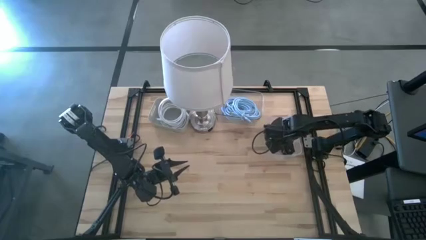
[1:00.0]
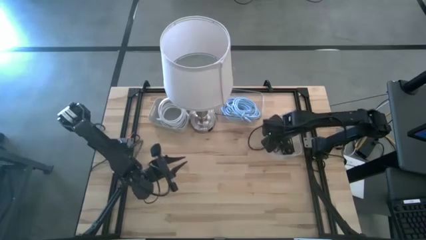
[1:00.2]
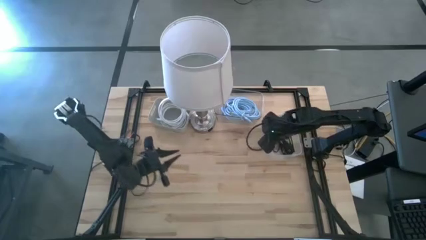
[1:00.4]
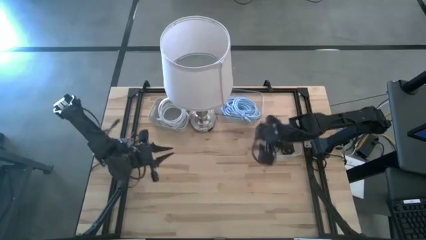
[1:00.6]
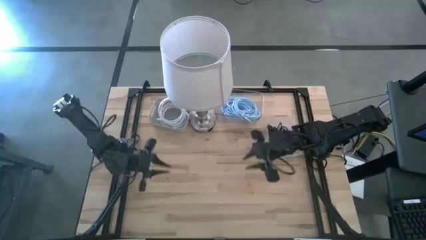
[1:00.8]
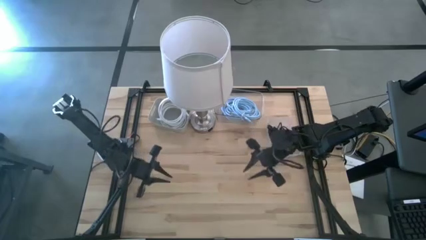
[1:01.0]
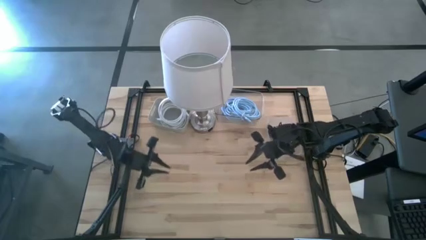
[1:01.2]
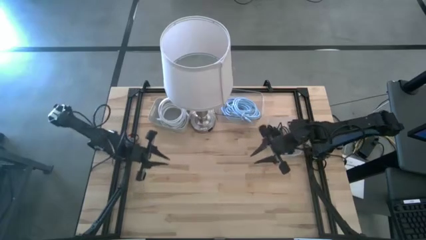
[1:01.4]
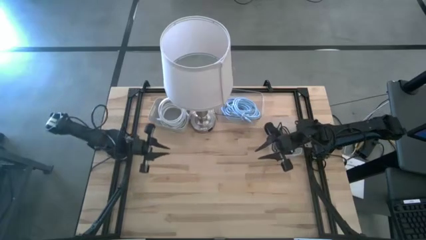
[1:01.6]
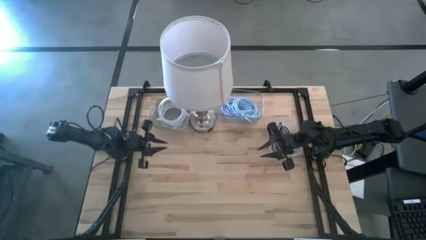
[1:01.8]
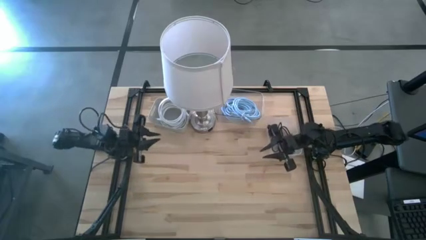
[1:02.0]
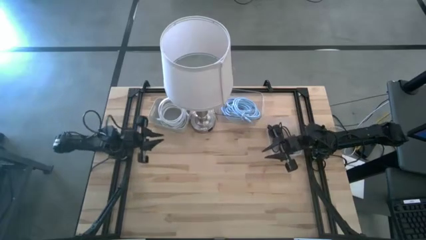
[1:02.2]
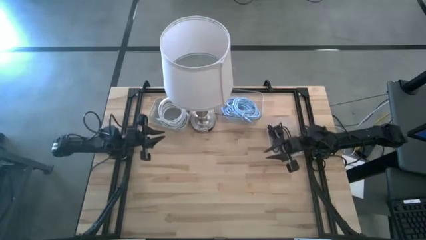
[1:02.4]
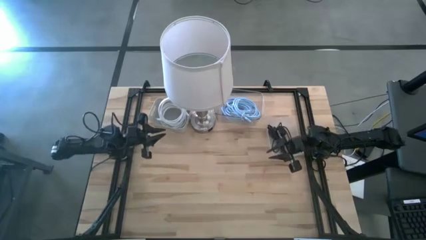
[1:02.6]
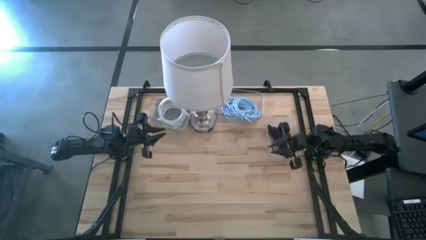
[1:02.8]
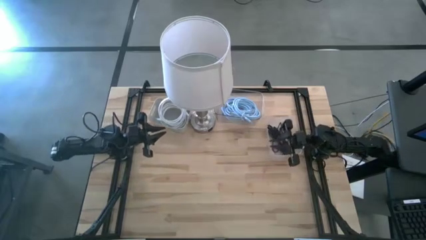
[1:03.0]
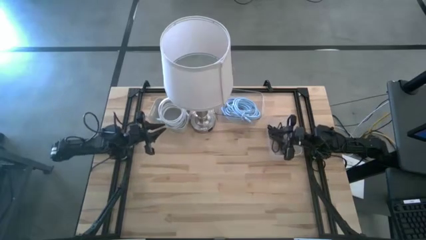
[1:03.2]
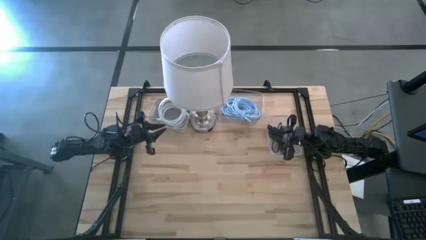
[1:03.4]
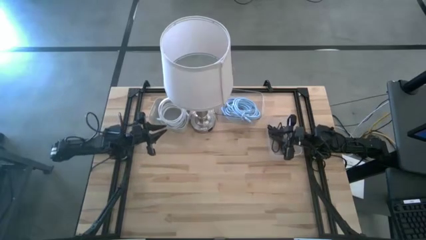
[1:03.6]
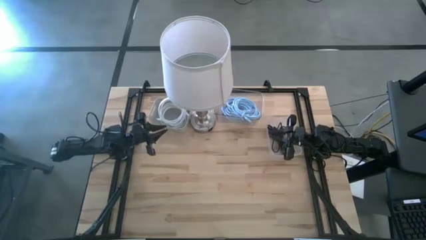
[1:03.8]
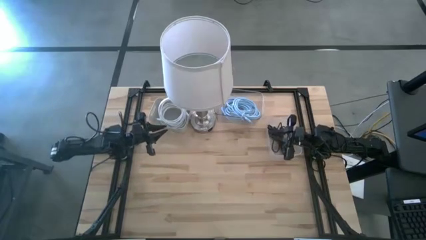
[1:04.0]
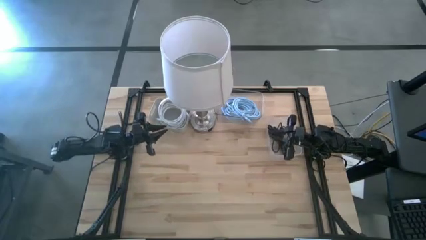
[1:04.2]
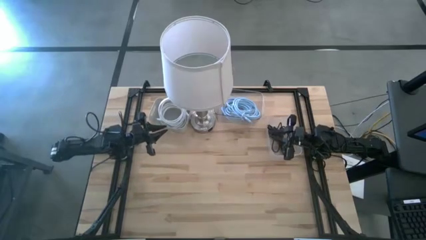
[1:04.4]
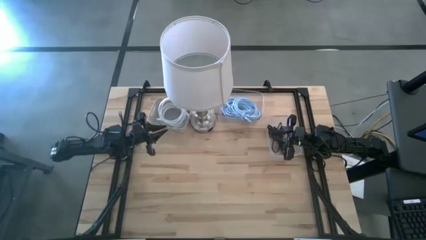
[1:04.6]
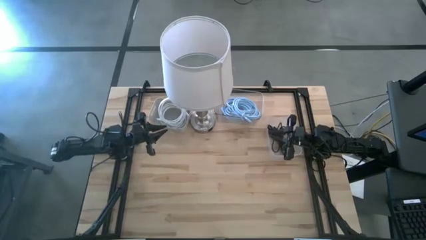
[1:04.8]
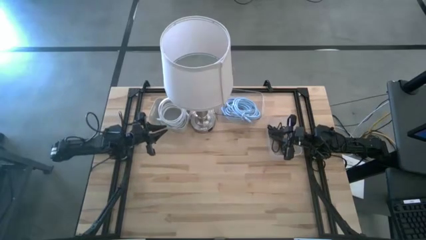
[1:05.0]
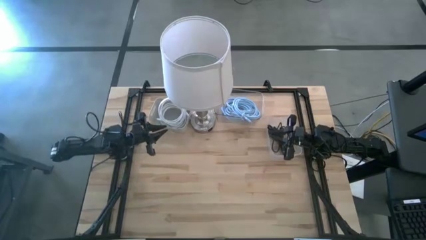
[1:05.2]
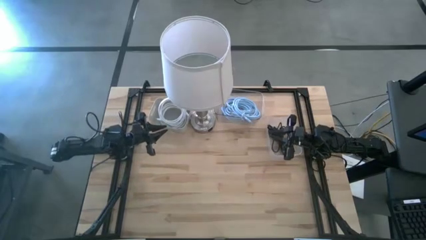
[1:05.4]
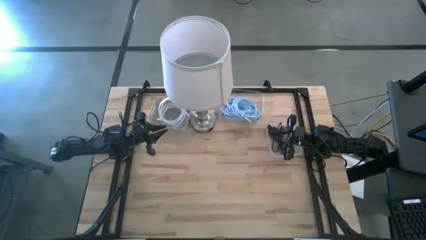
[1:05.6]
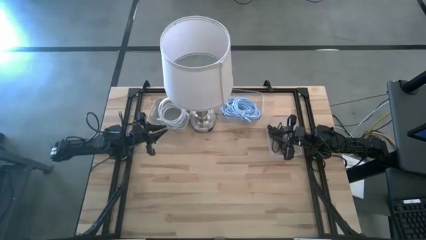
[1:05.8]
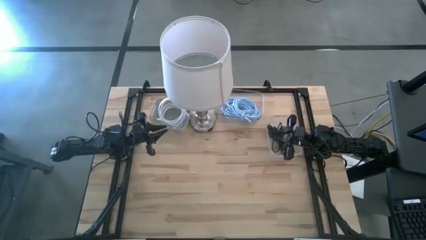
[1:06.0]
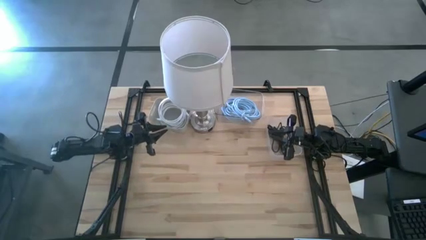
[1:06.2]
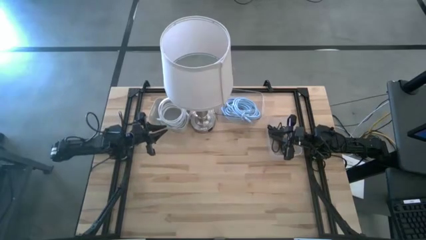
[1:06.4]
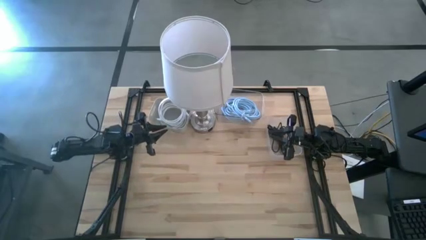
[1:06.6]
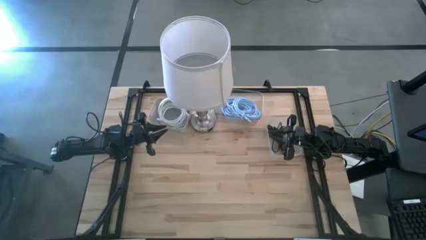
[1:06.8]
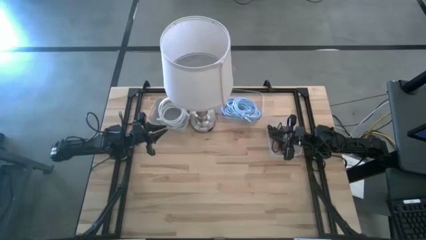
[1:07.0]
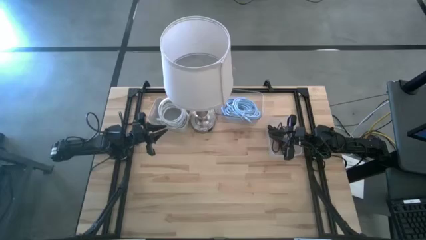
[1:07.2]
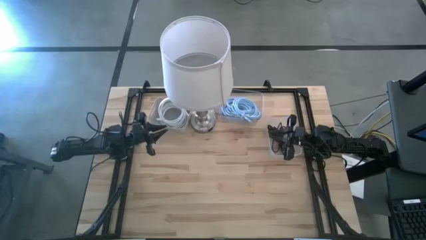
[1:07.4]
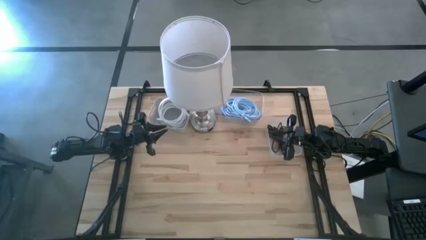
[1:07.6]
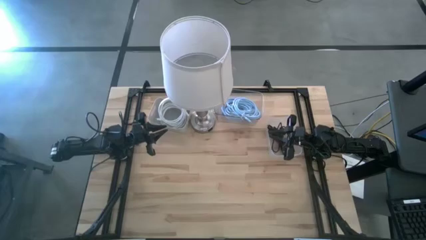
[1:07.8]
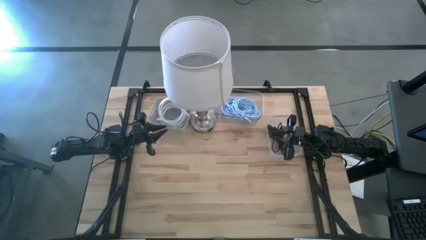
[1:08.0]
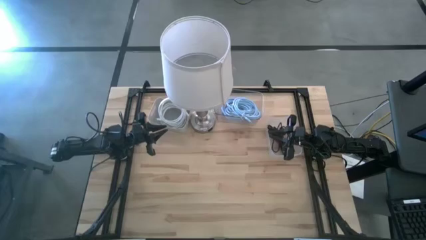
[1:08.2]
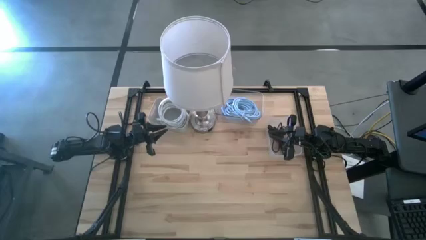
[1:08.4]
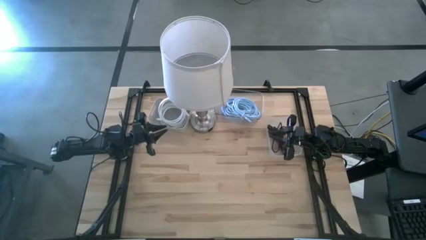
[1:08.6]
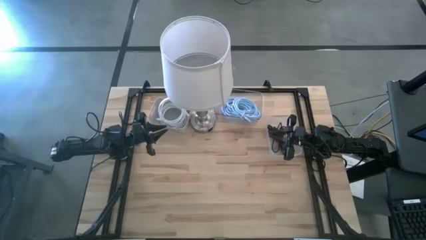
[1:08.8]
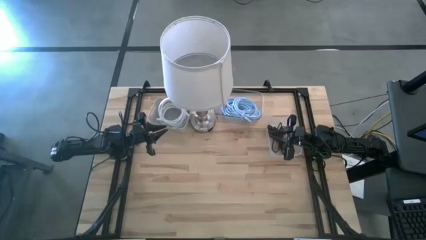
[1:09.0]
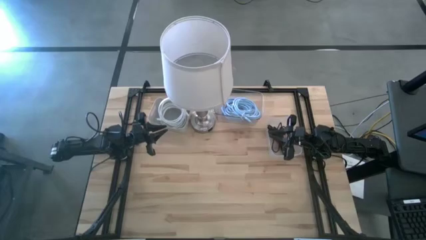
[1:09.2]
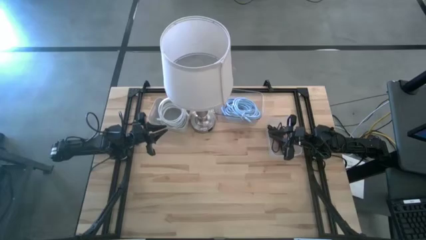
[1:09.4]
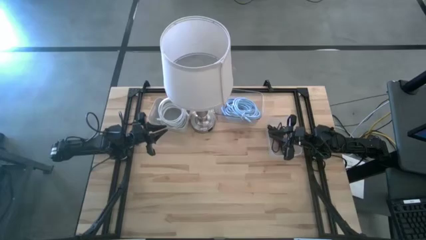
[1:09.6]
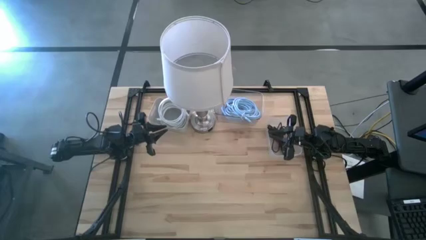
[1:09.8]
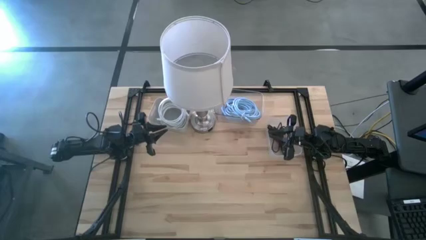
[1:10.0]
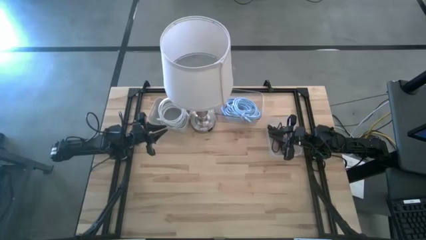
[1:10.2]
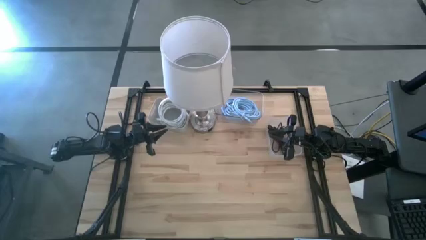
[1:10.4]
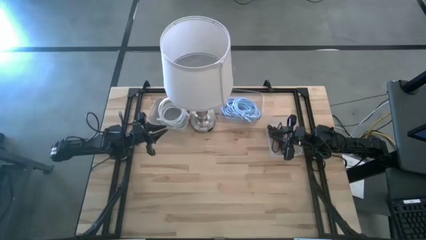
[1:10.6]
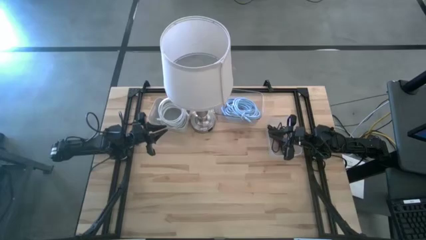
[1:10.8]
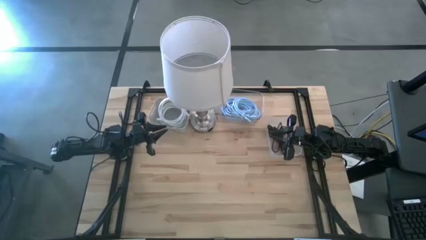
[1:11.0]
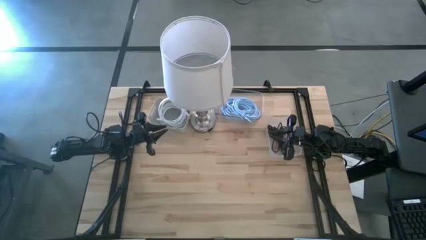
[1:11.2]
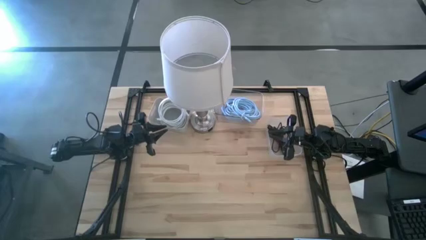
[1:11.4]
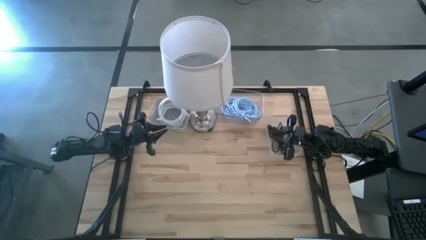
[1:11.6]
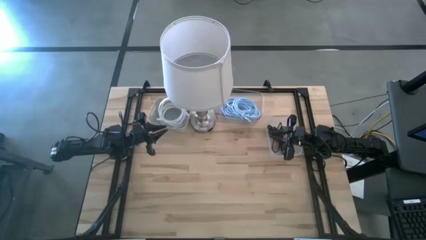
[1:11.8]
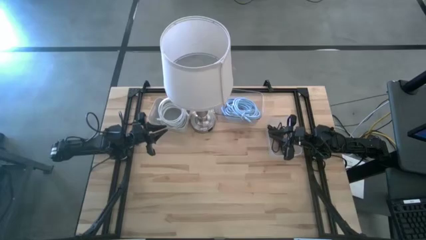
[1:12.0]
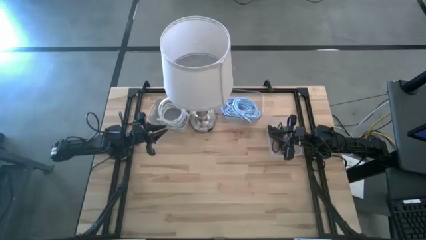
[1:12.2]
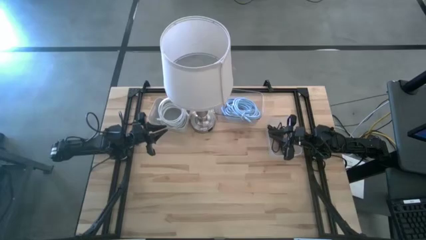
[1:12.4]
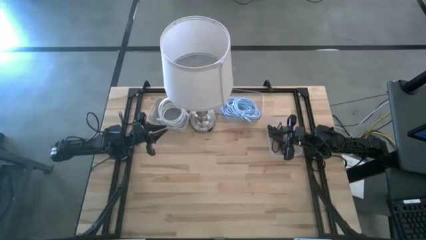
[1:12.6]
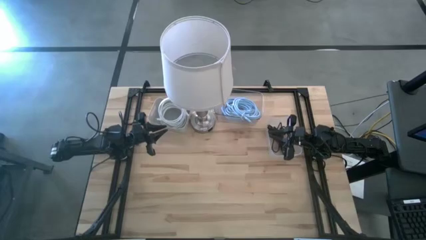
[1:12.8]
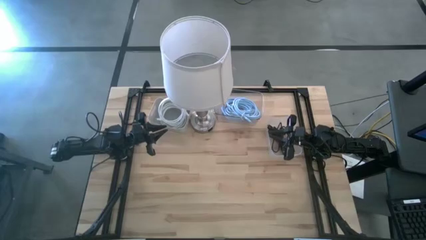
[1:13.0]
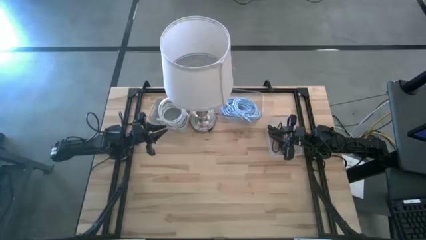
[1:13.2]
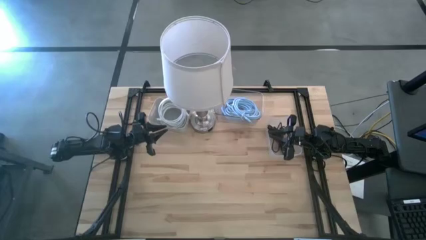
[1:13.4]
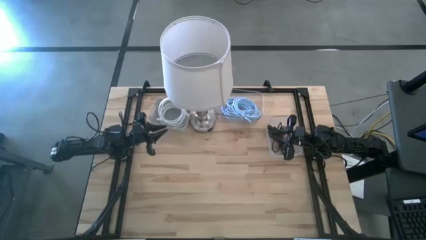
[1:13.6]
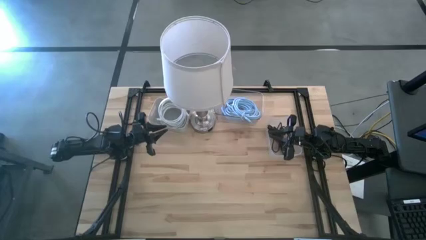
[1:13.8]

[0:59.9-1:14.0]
Task: Pick & Place USB Port
Return to Home Position

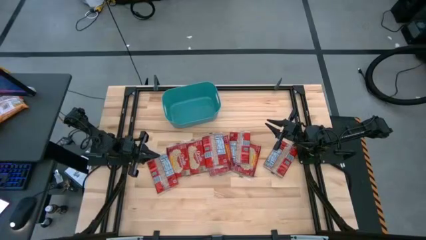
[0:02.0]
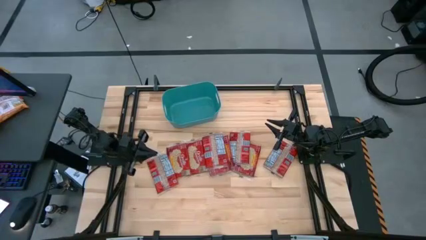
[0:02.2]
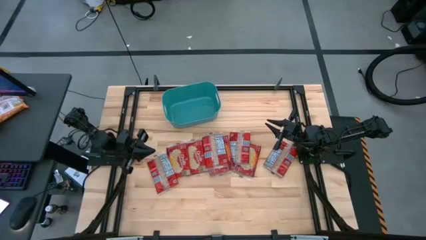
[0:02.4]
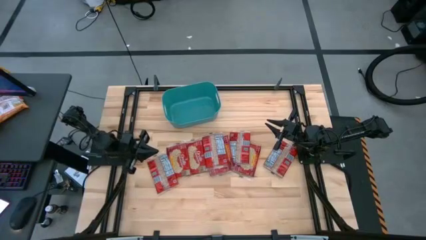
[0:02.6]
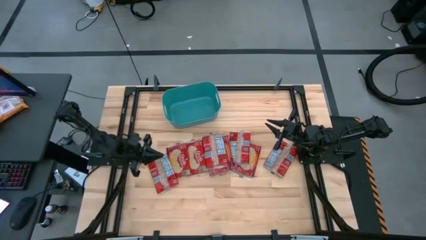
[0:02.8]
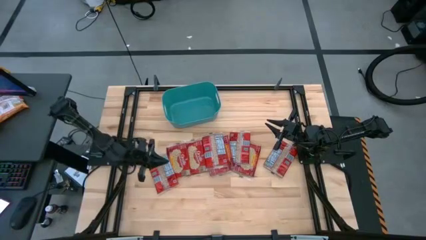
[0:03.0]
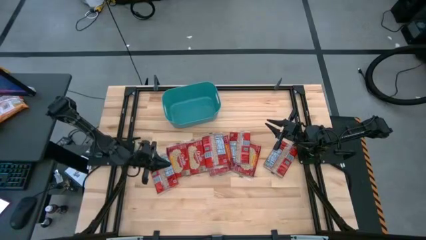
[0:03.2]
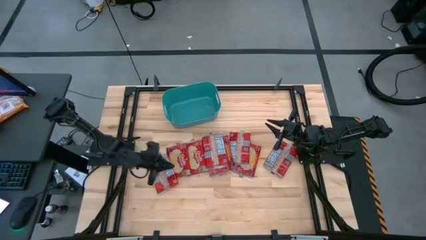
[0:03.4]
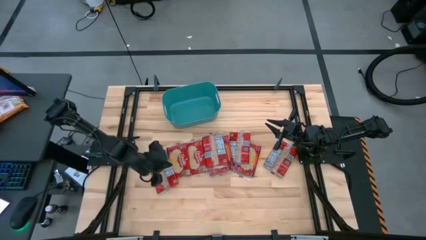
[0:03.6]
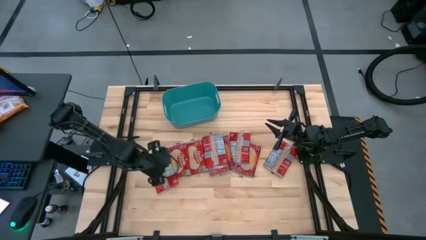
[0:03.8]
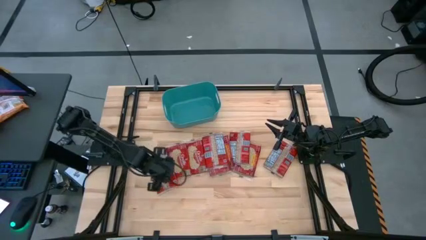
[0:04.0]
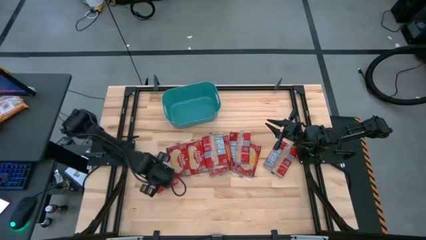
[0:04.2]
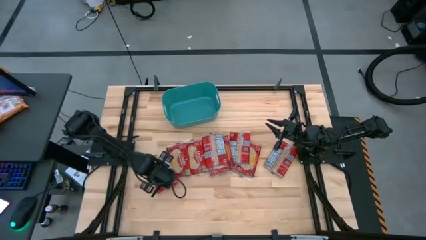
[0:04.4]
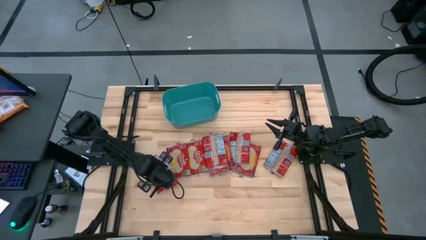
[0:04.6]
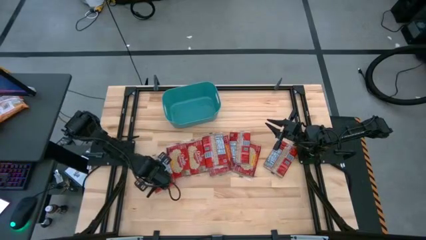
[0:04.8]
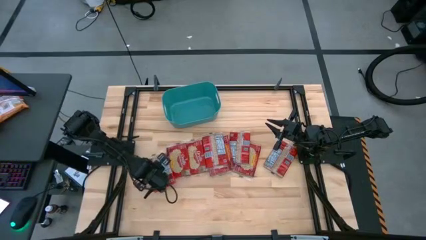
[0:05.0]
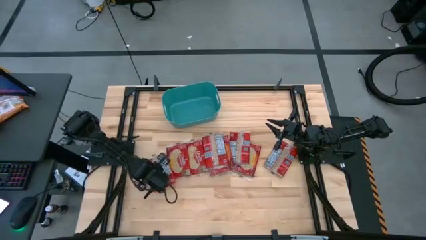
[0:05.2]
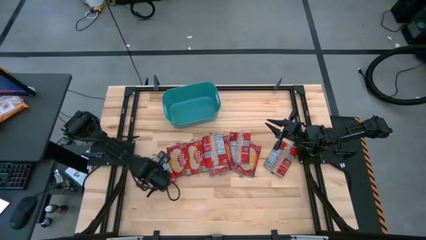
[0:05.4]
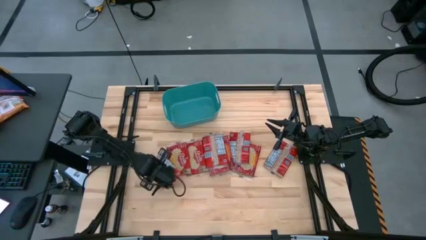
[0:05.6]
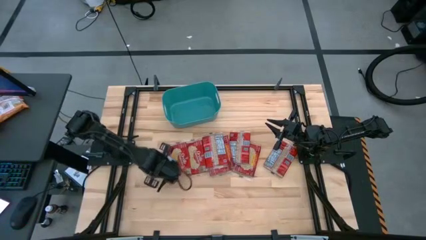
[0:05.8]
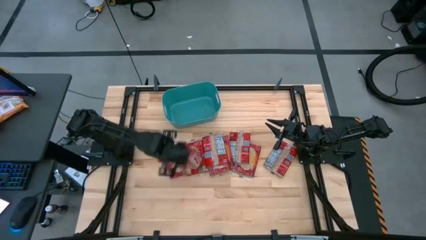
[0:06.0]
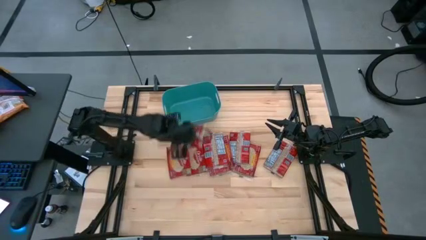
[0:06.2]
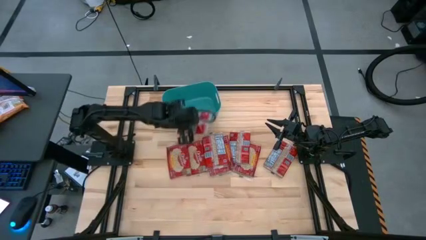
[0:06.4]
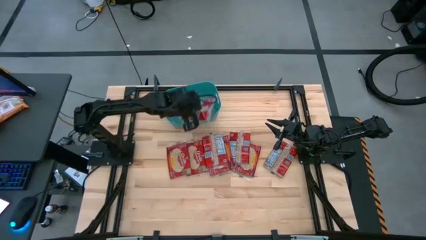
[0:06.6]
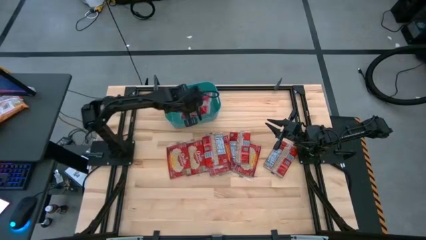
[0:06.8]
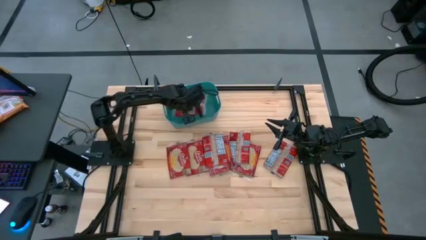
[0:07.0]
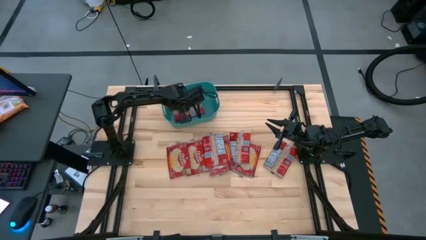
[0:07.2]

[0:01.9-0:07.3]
Task: Sort popcorn bags into baskets
Put the popcorn bag into the green bin
